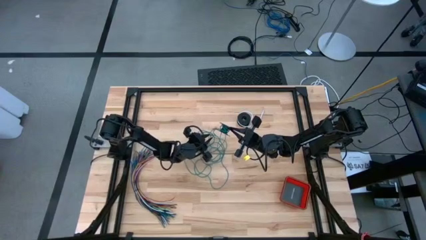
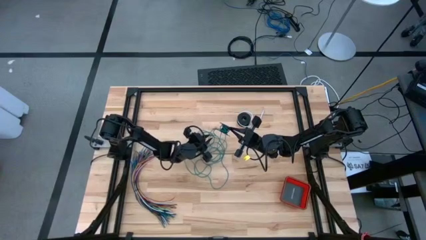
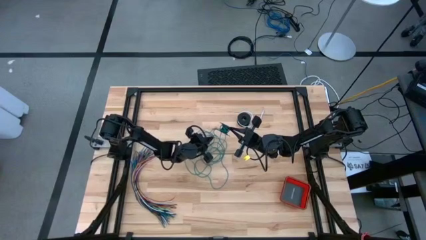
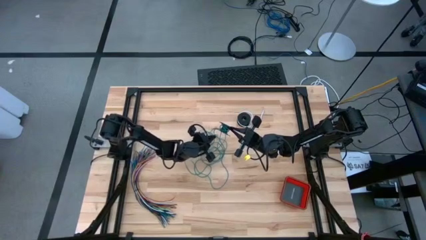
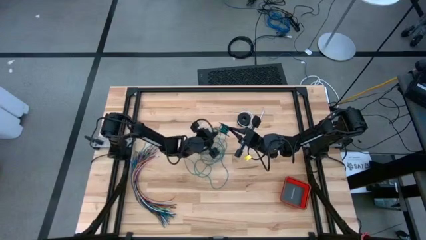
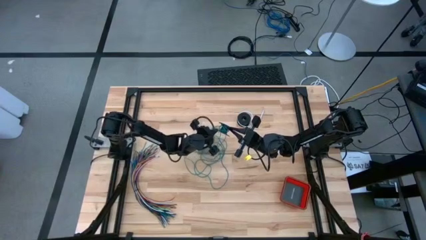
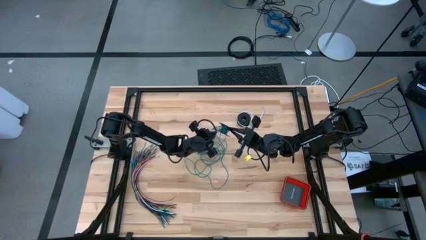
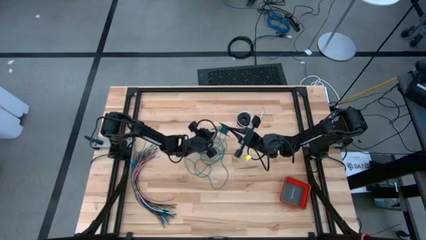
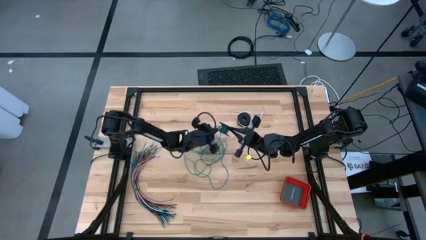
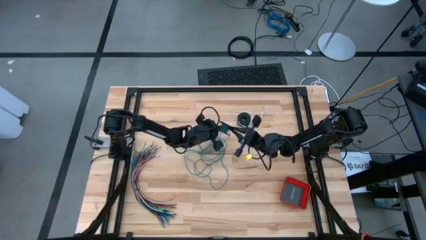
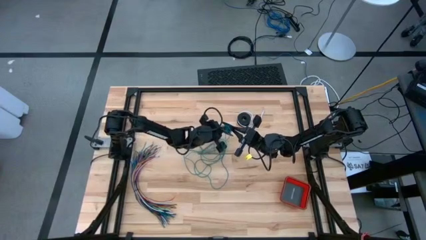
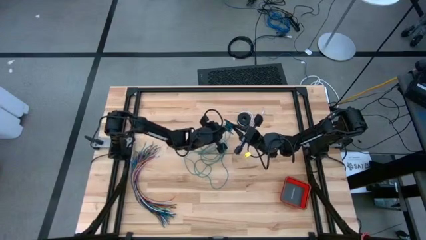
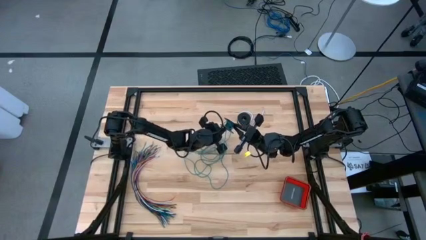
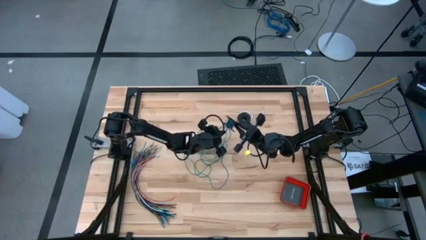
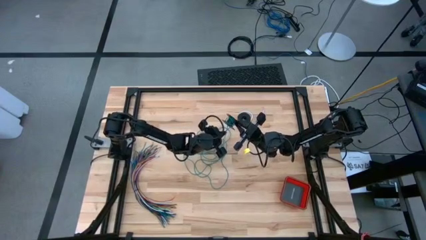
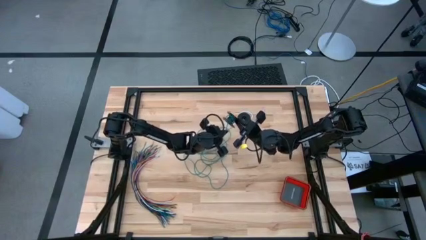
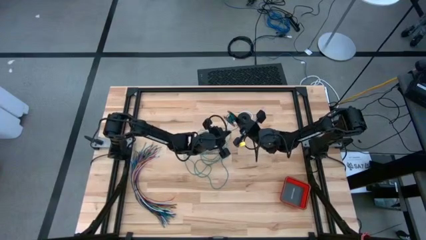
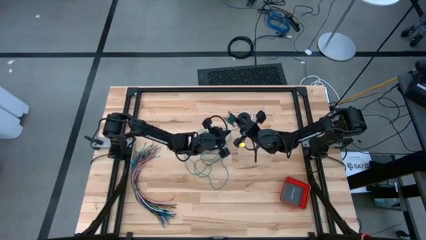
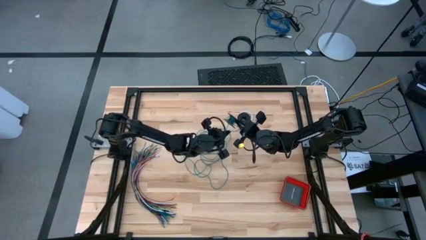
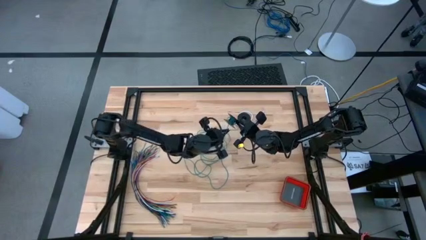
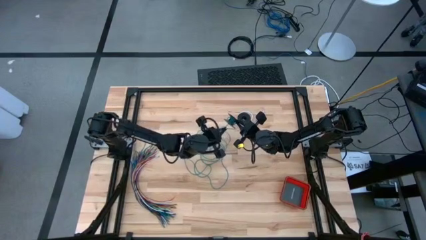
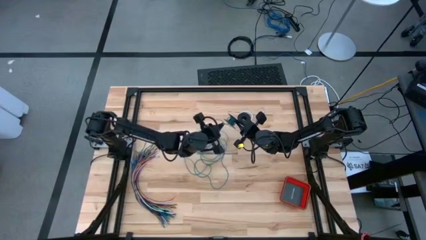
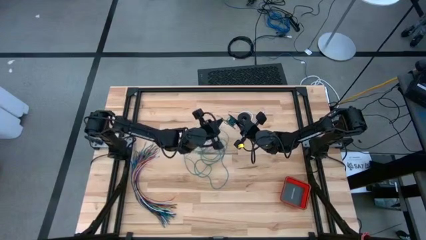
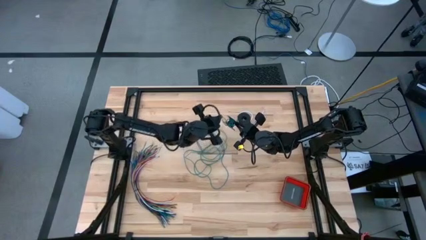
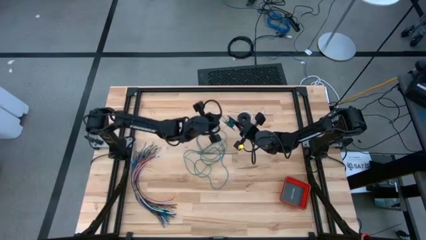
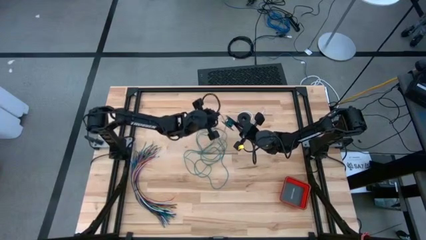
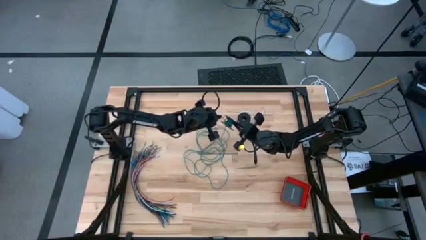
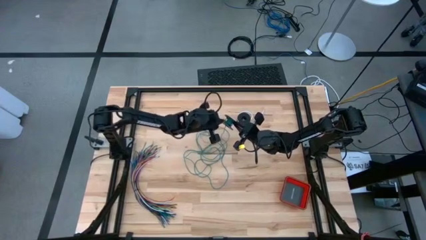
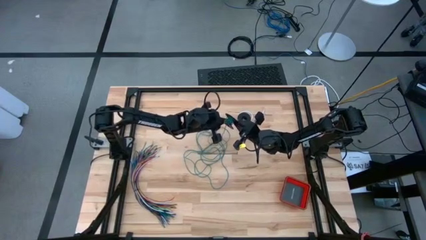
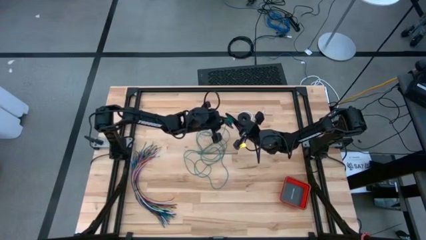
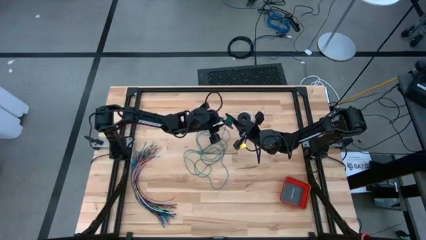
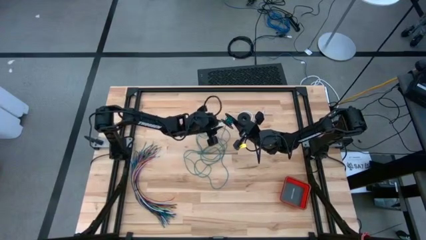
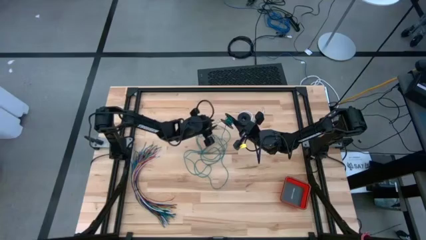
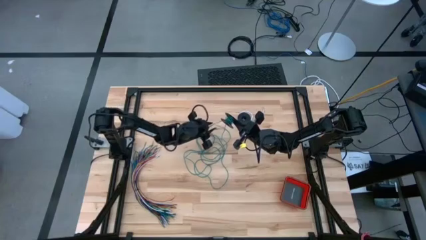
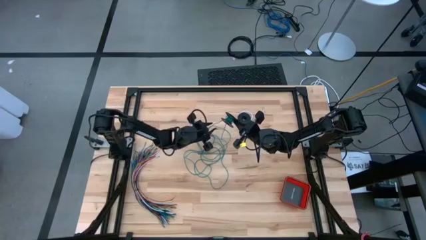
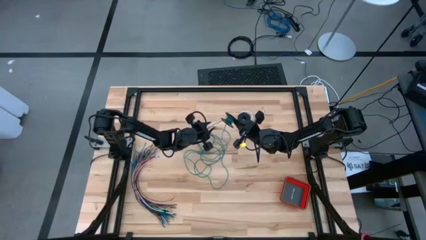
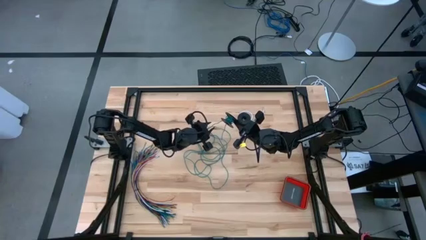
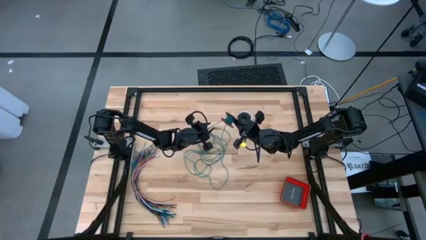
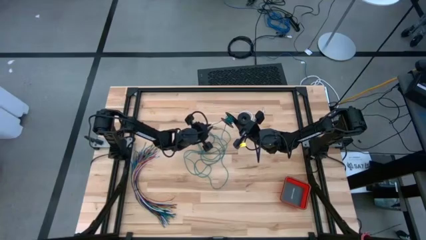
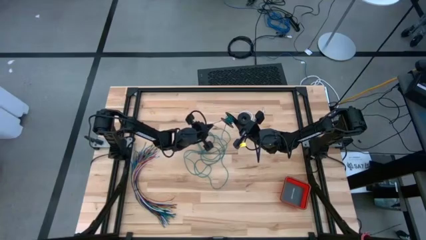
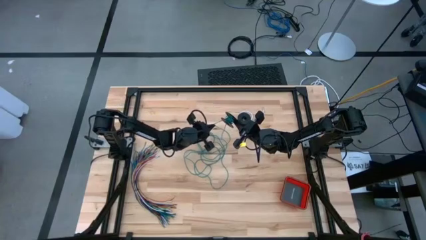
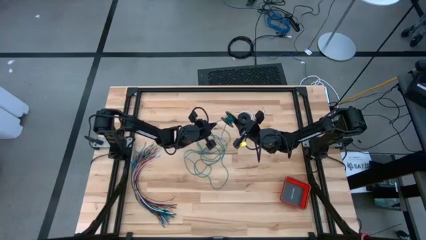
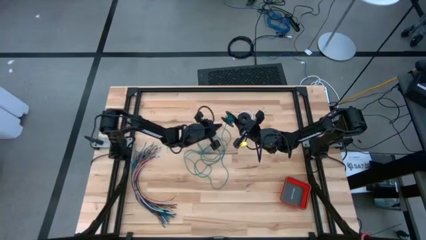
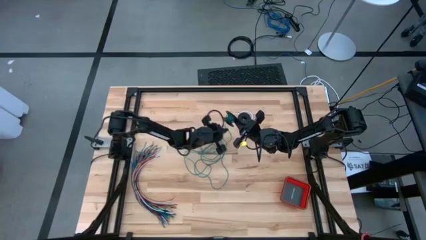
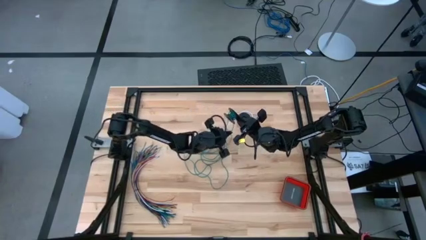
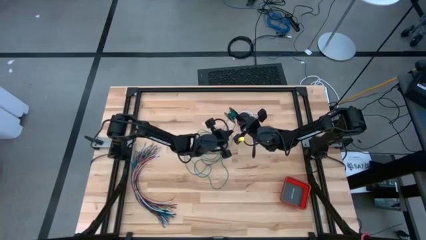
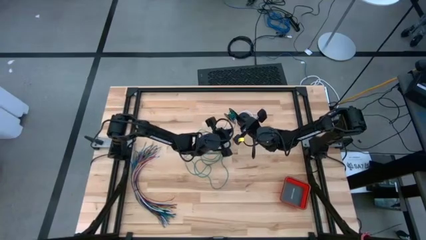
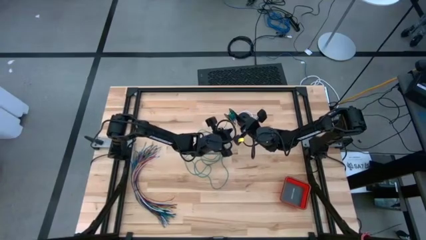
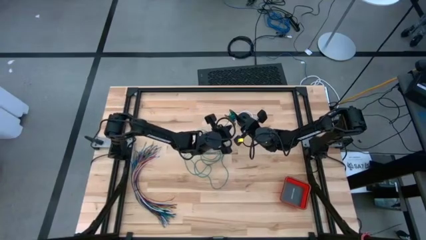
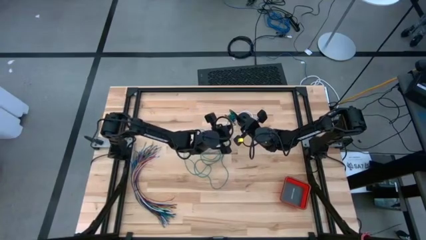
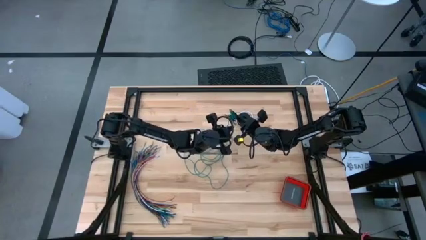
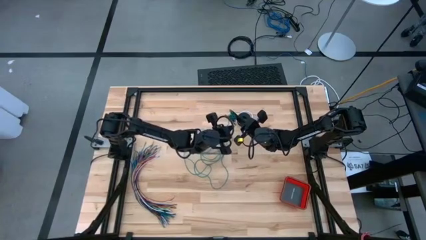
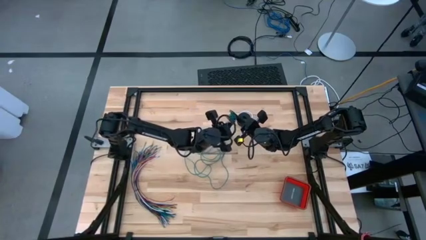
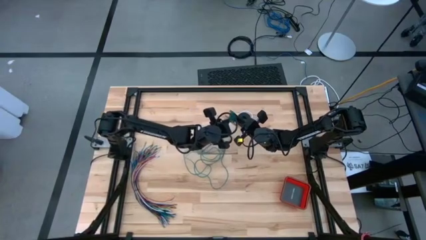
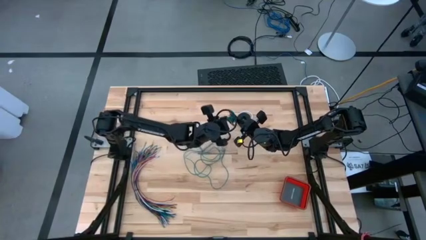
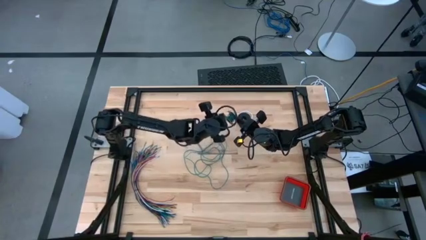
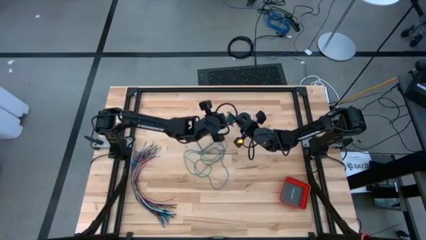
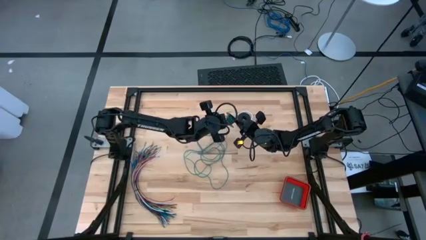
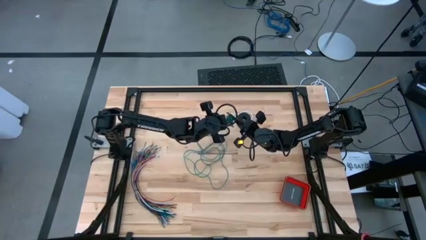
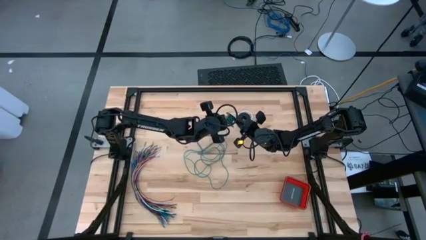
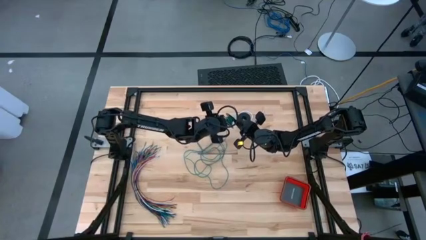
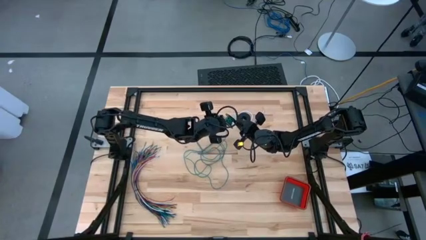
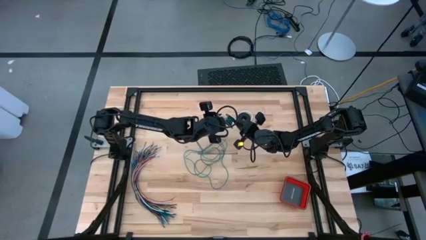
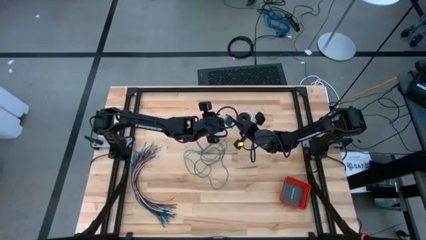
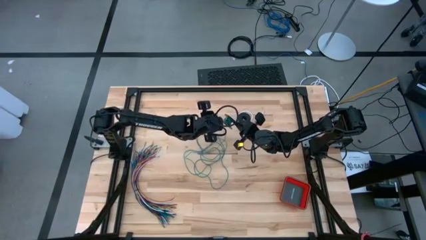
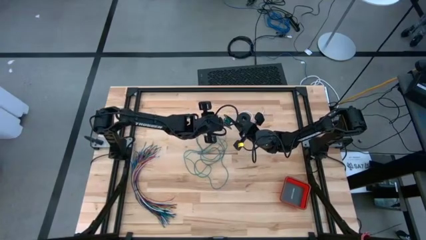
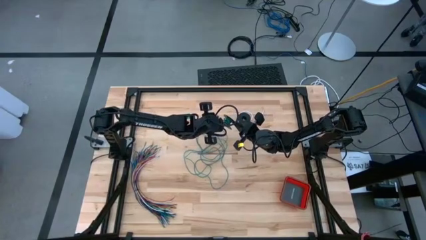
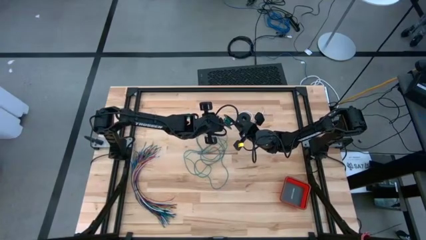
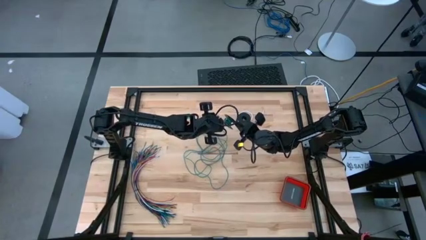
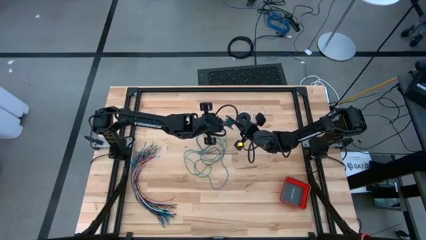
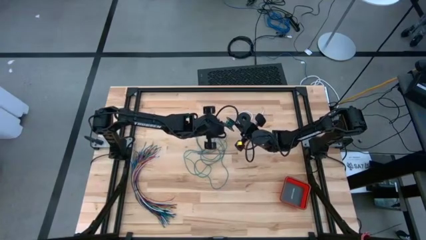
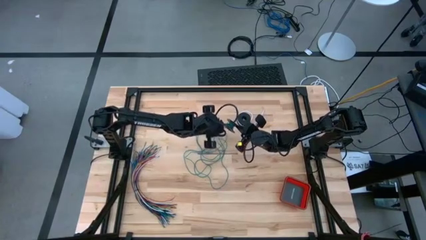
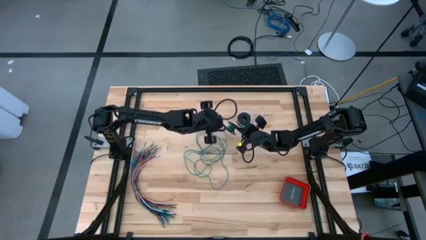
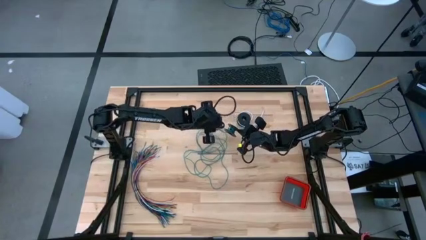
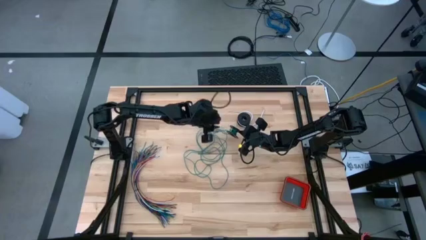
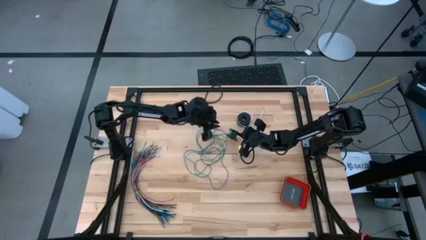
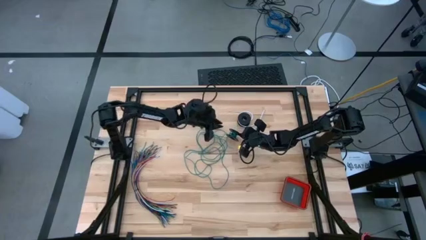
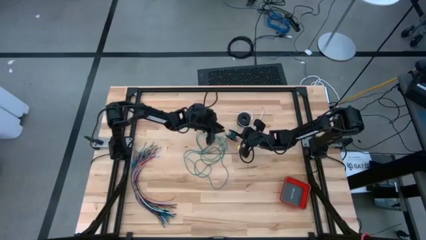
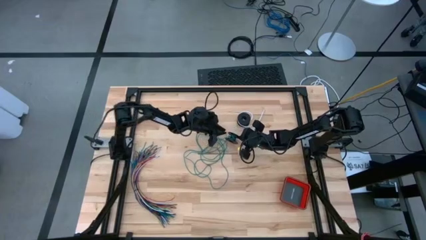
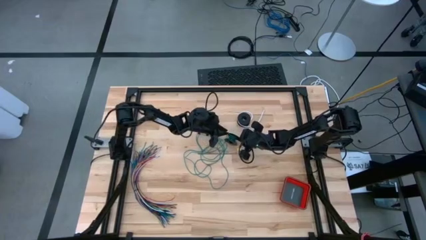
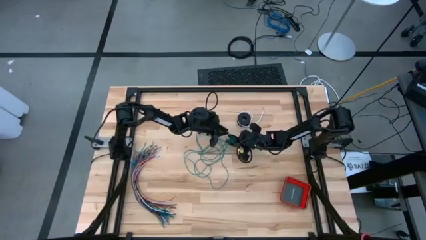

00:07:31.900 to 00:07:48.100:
Task: Coil cords
Coil the green wire onto the spool
